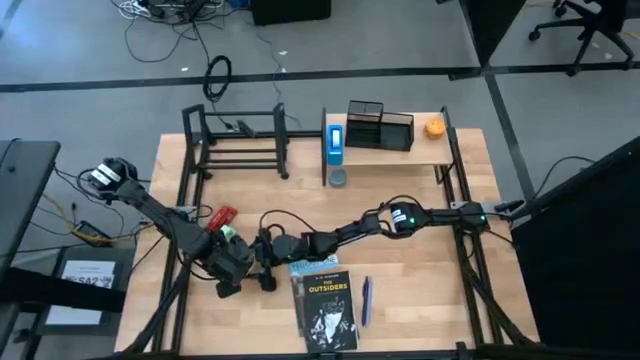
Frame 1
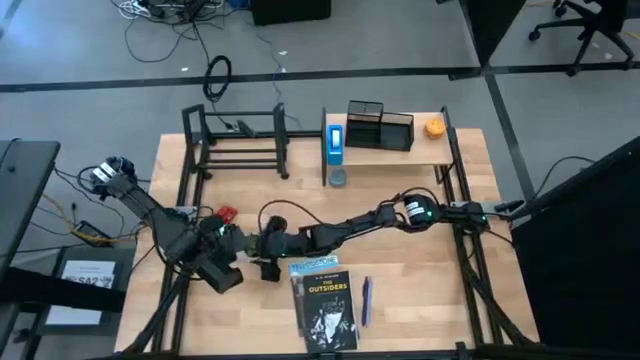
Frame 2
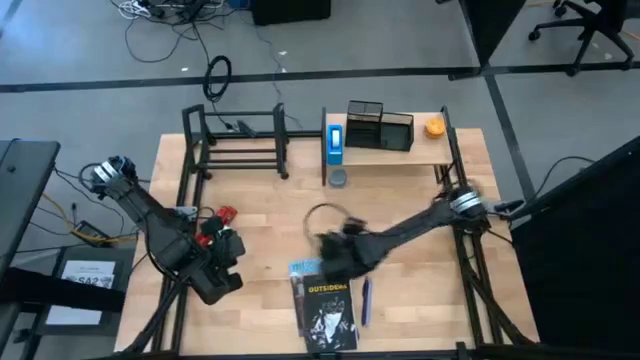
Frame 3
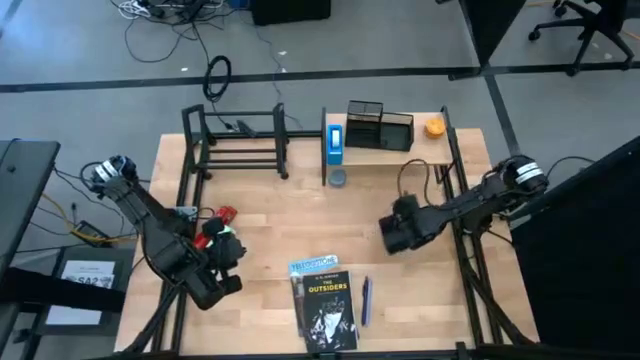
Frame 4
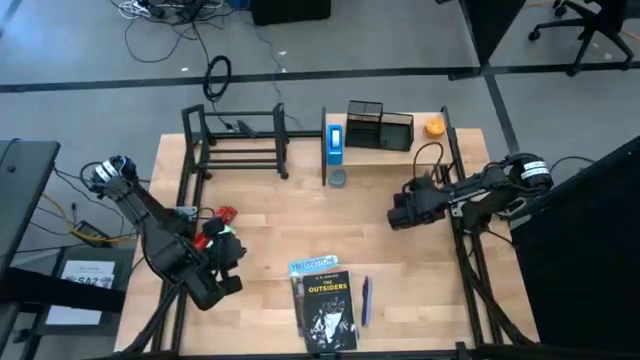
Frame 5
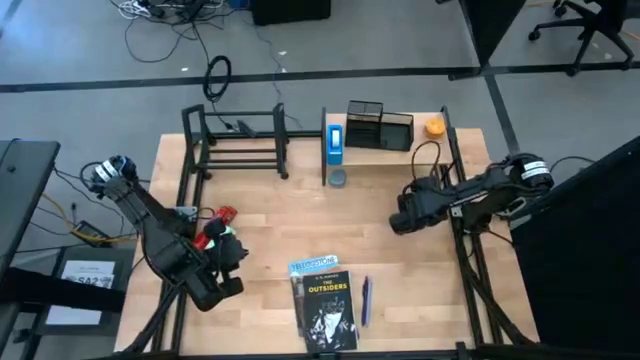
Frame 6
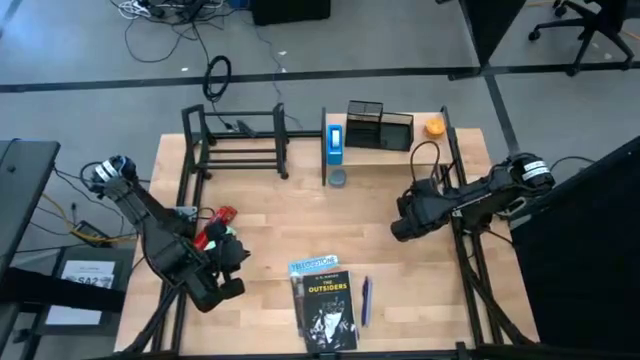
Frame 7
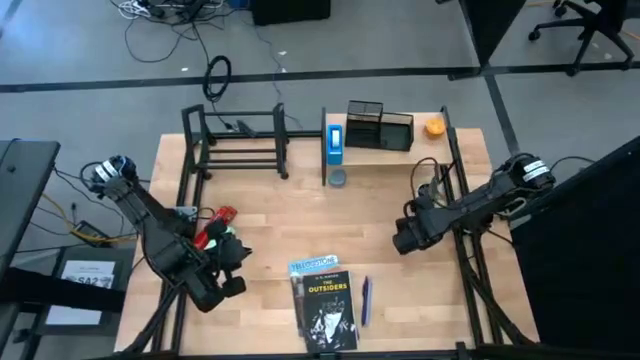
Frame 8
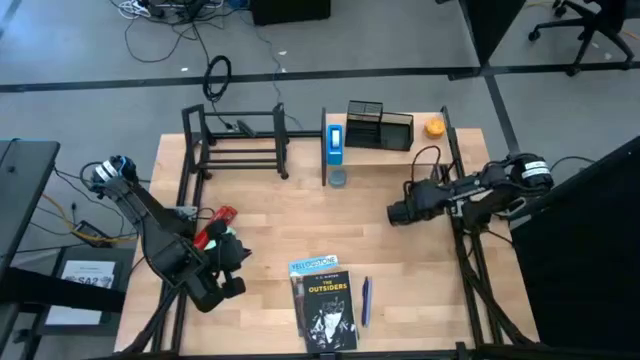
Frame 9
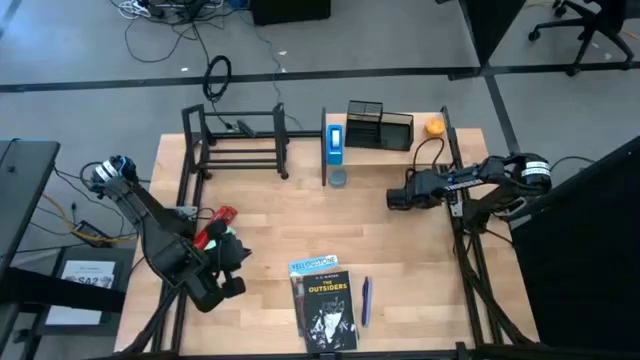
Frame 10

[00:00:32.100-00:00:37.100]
Task: Stock shelves
Put the white vase plant under the shelf

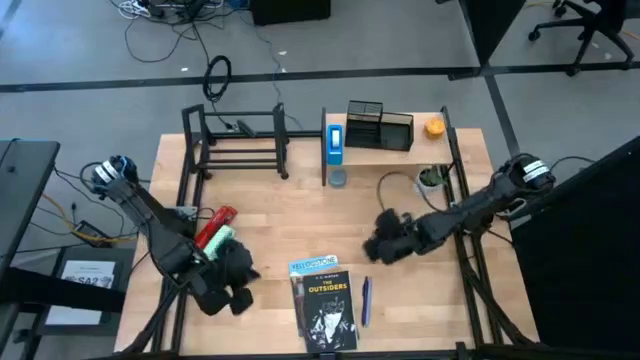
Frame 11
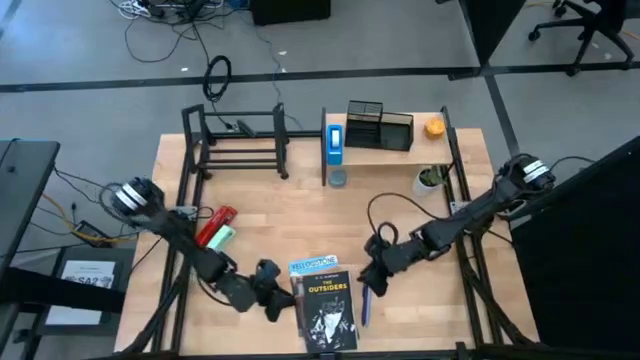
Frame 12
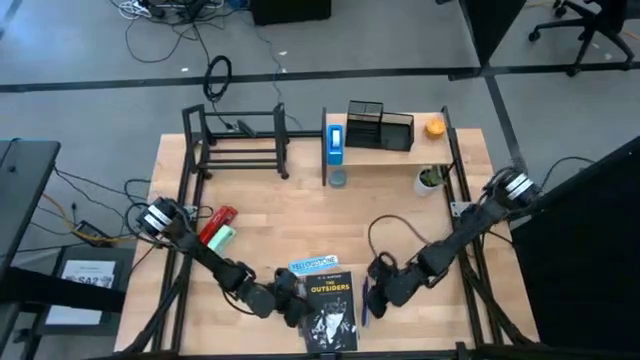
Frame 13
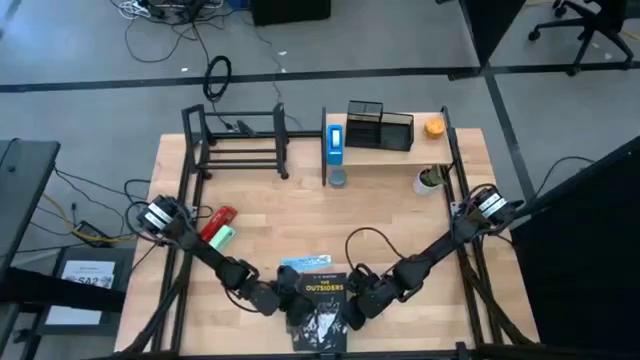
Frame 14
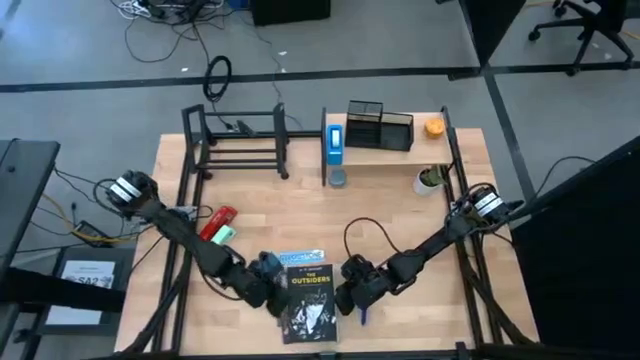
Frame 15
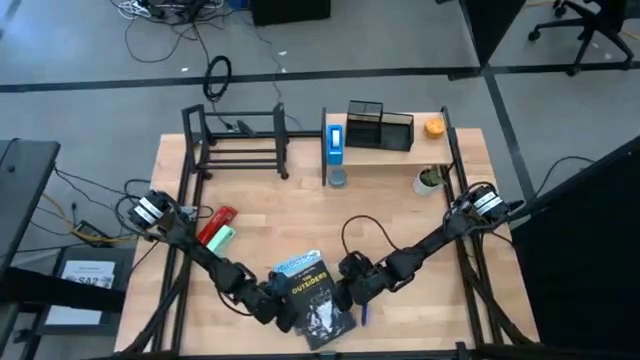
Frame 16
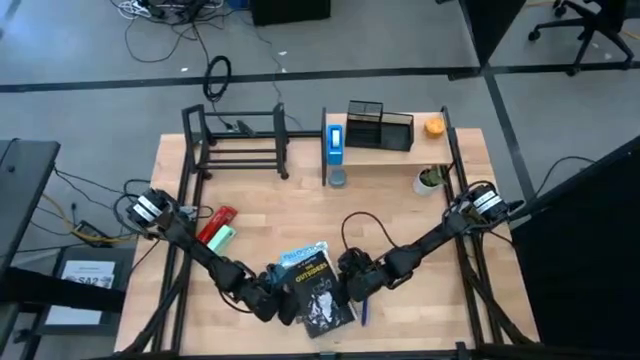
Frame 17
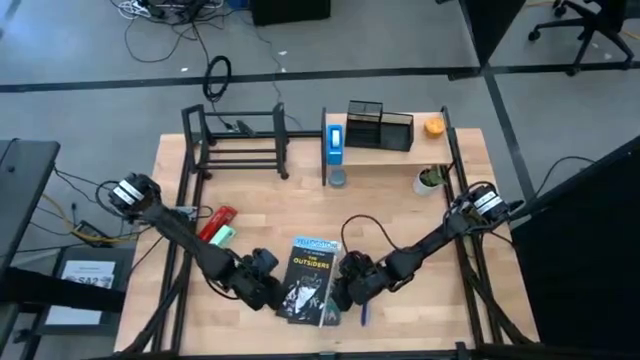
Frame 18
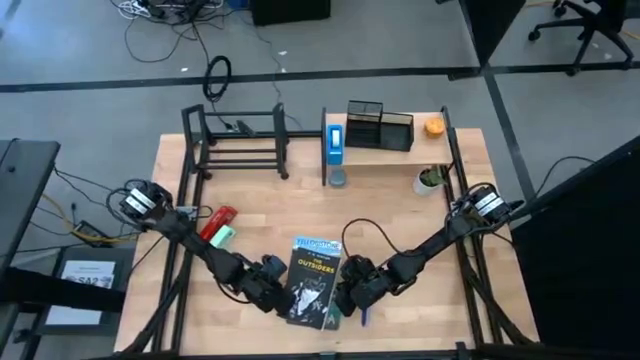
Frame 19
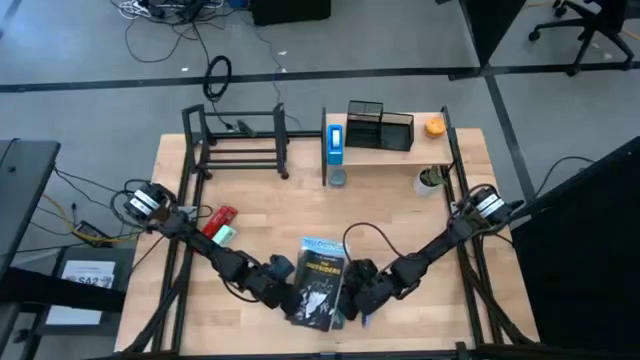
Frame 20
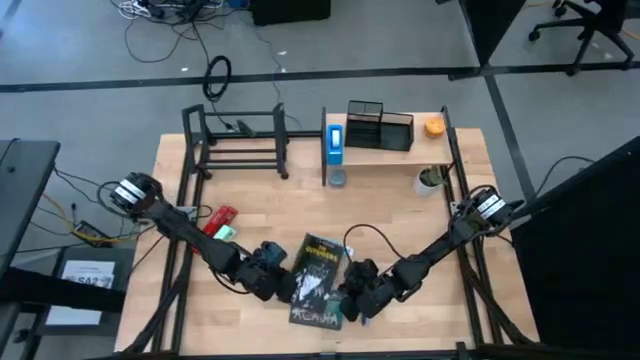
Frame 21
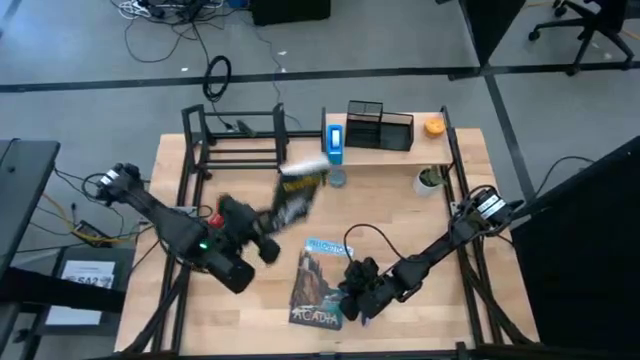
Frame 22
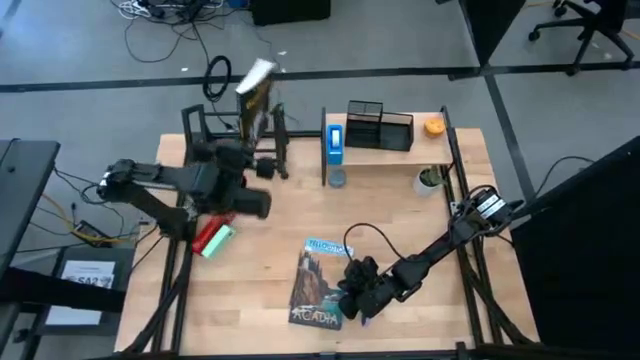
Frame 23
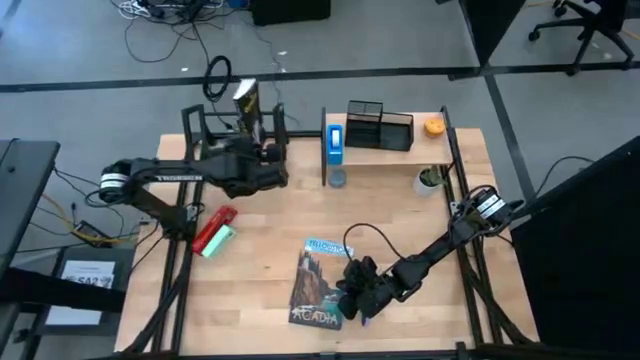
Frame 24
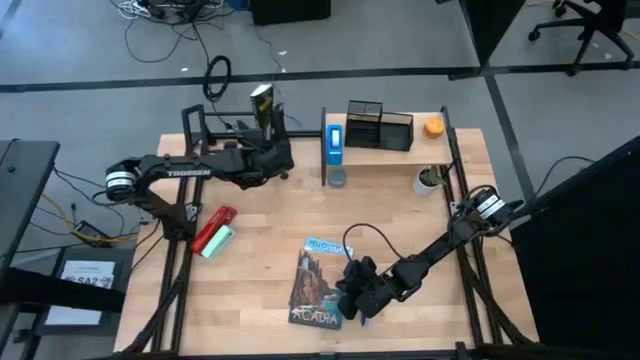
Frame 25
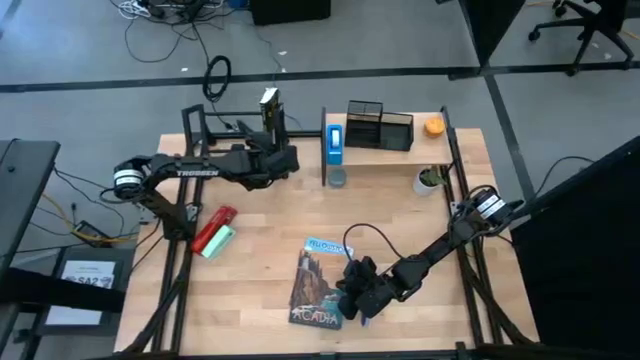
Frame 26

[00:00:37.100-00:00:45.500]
Put the black book on the book organizer

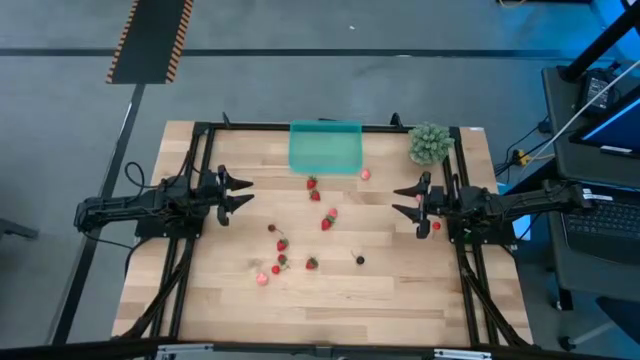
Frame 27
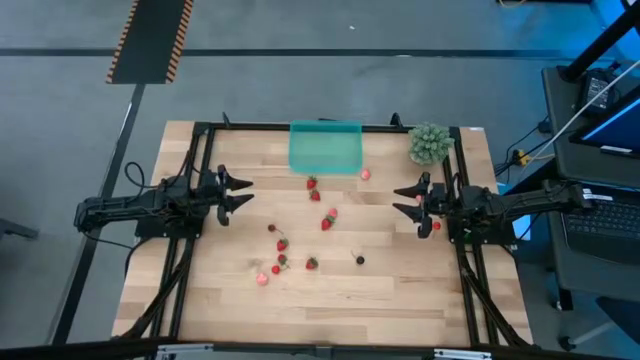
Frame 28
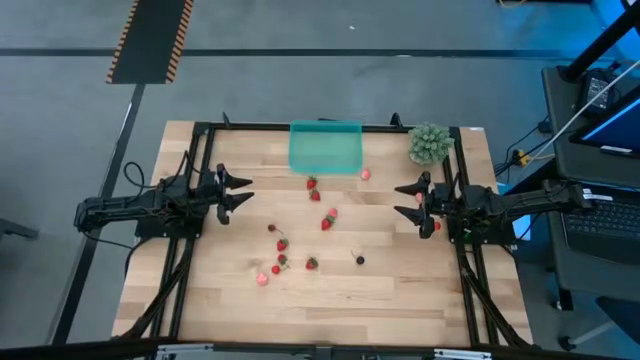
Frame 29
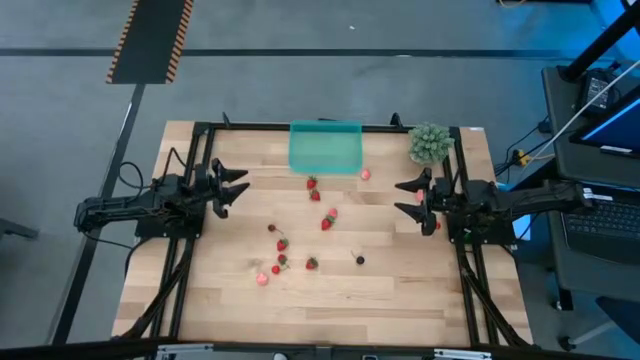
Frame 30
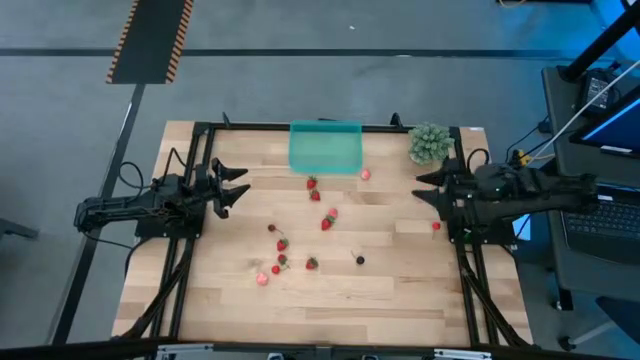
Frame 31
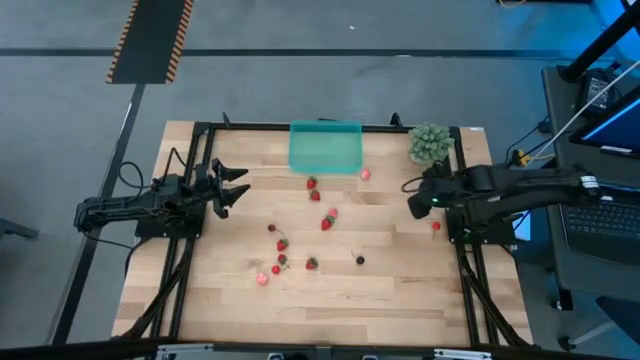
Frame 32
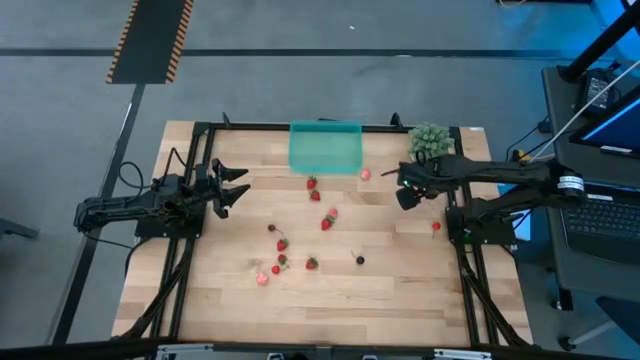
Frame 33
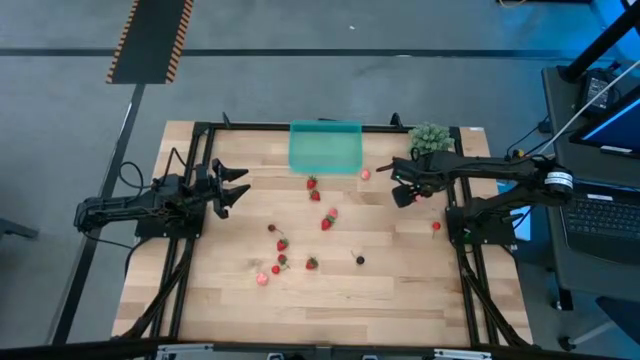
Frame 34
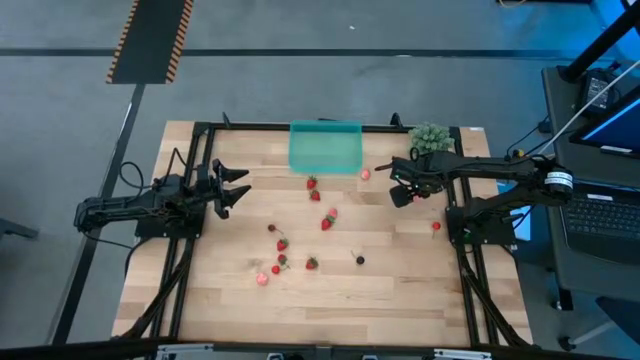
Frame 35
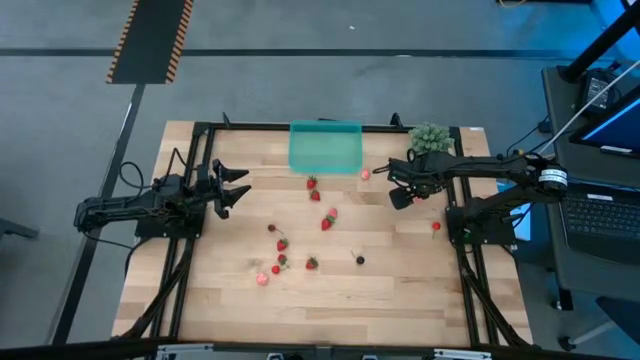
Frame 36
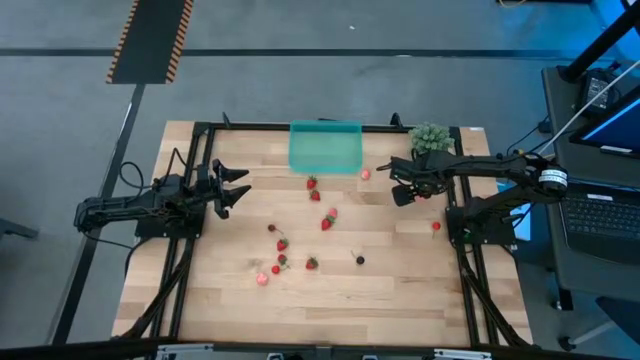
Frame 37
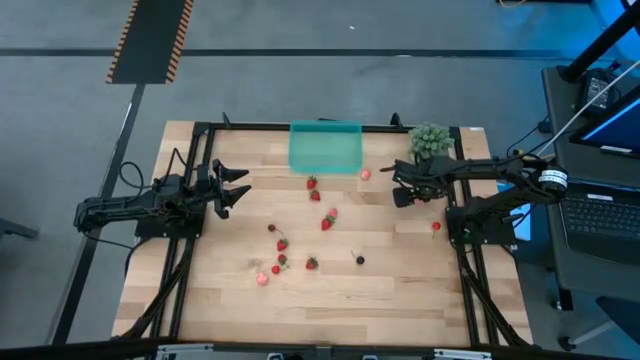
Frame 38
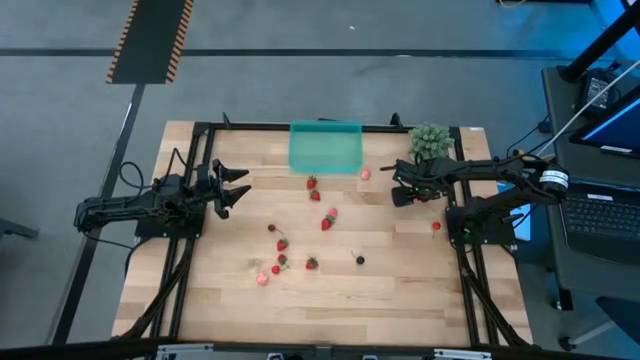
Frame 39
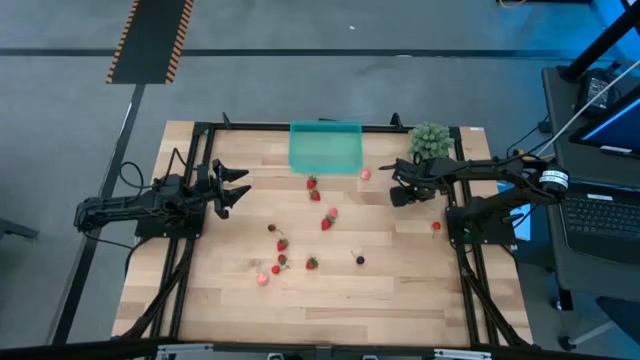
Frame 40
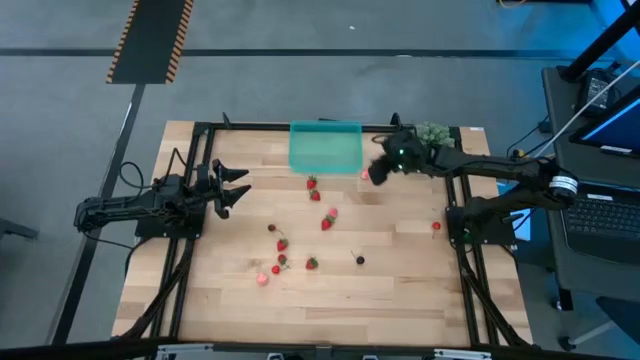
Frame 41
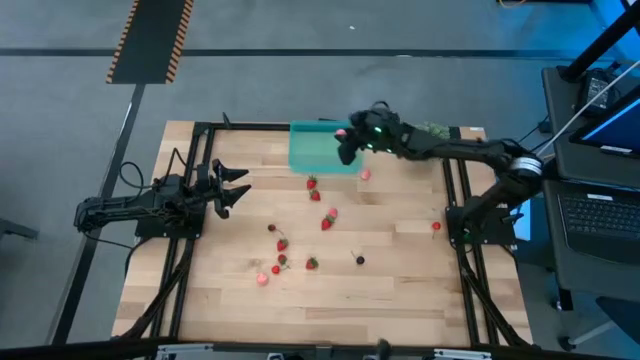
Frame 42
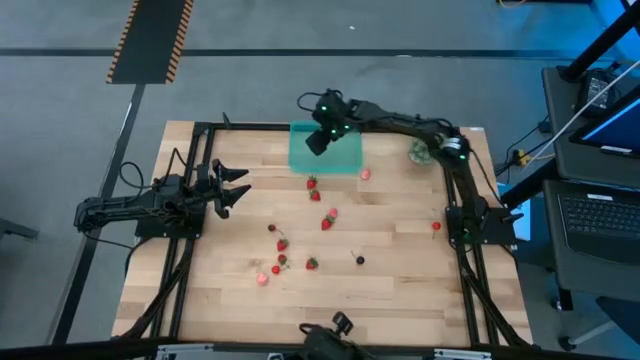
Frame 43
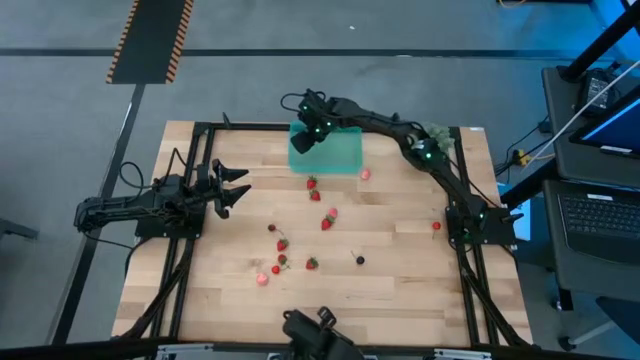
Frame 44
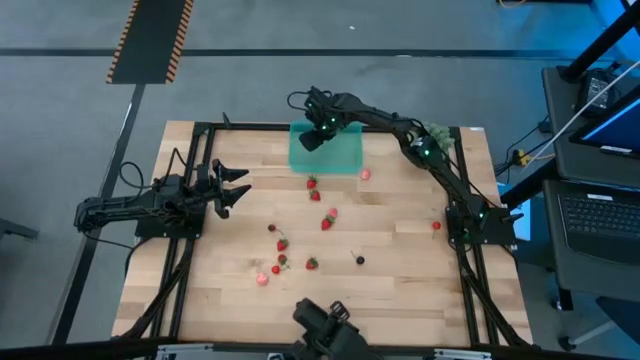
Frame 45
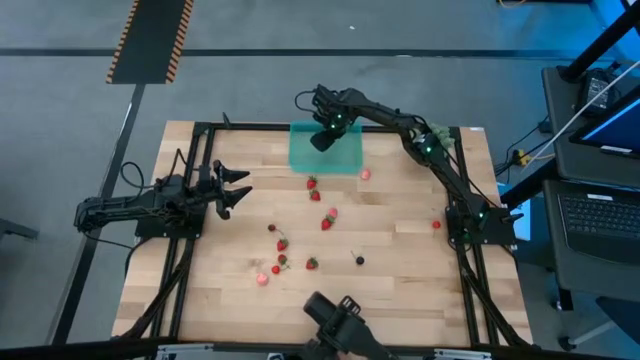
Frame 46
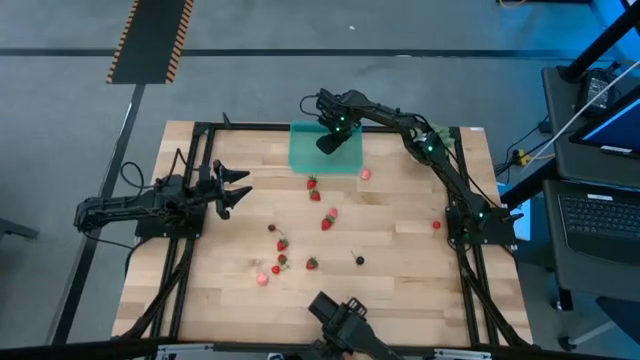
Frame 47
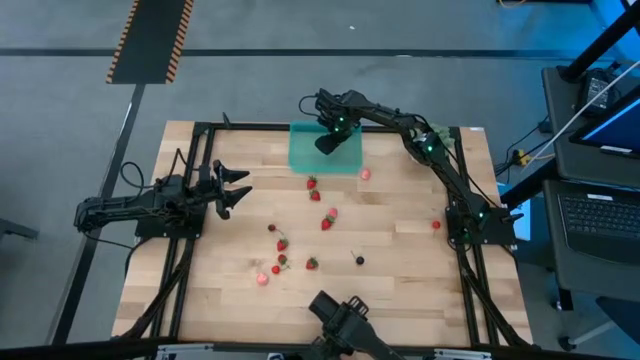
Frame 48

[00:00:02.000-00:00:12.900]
Task: Pick and placing Produce into tupperware
Put the pink peach into the green container
